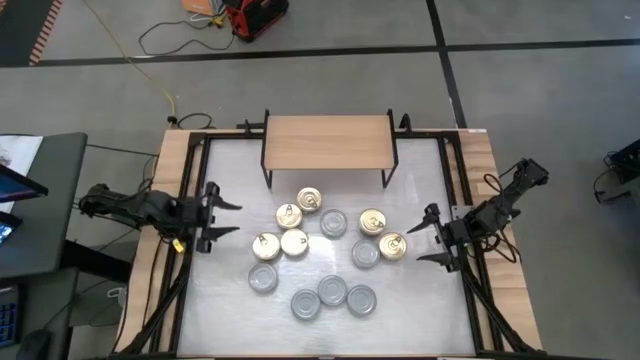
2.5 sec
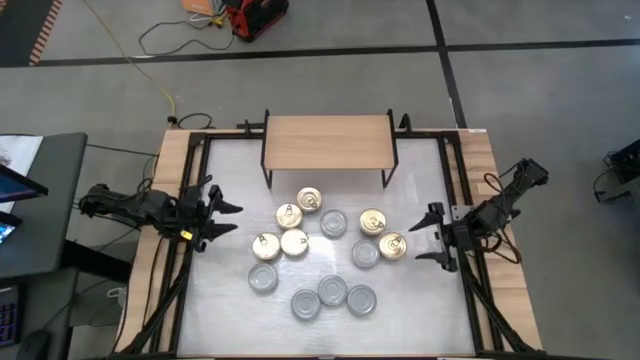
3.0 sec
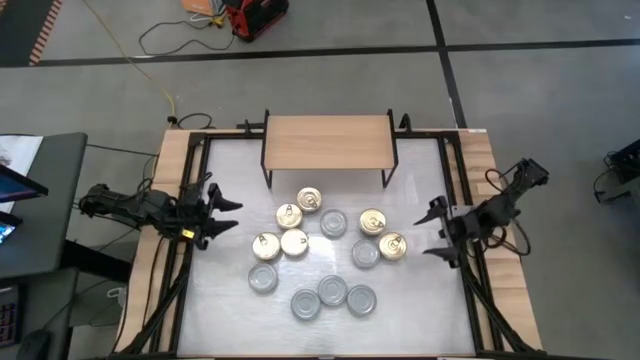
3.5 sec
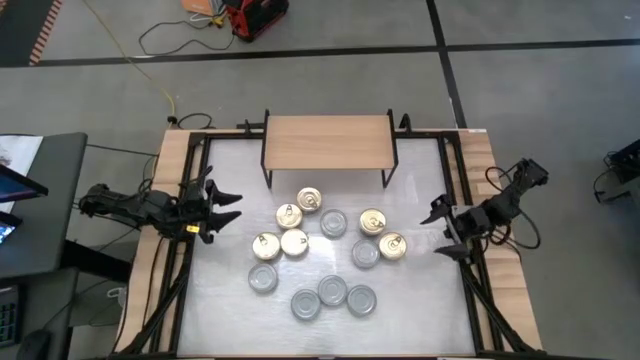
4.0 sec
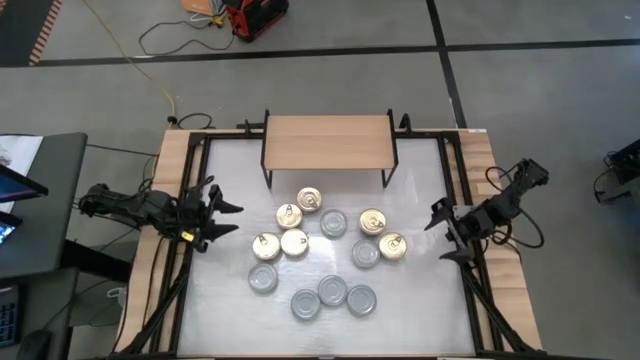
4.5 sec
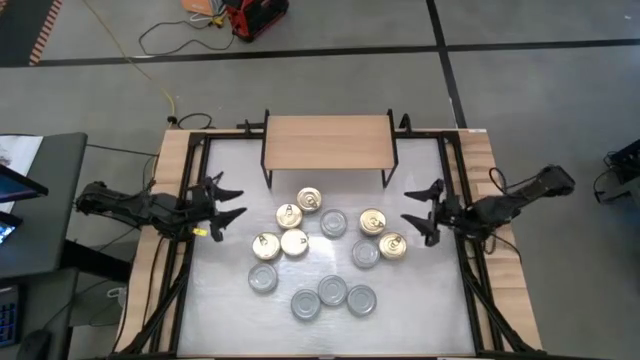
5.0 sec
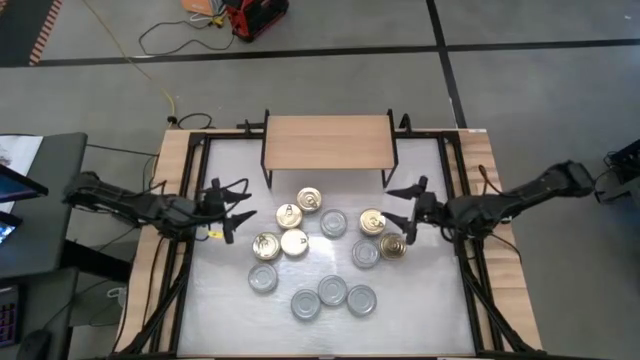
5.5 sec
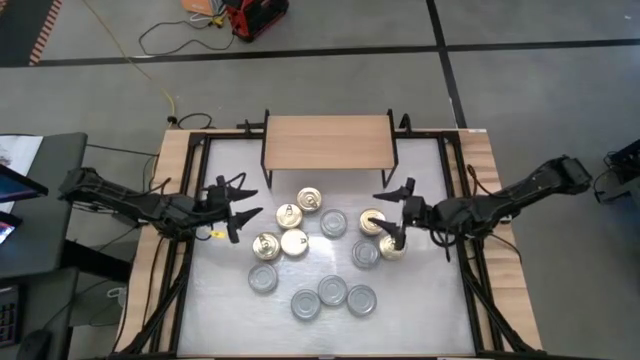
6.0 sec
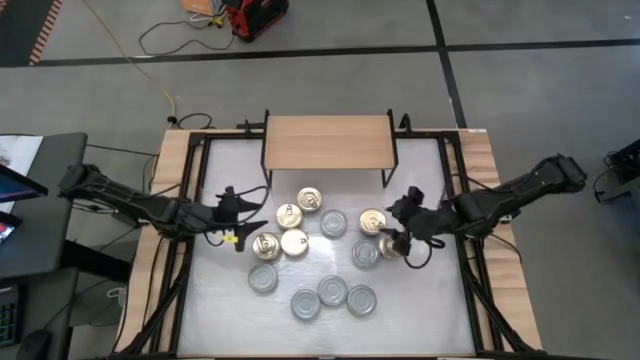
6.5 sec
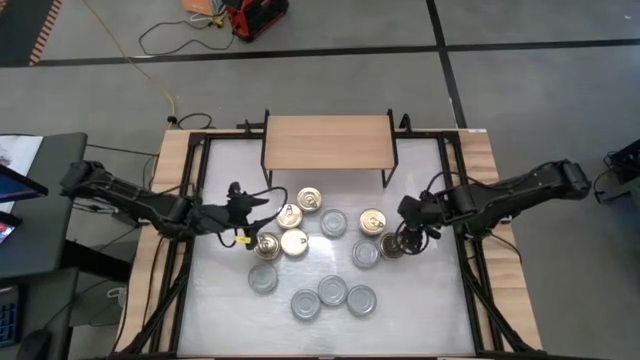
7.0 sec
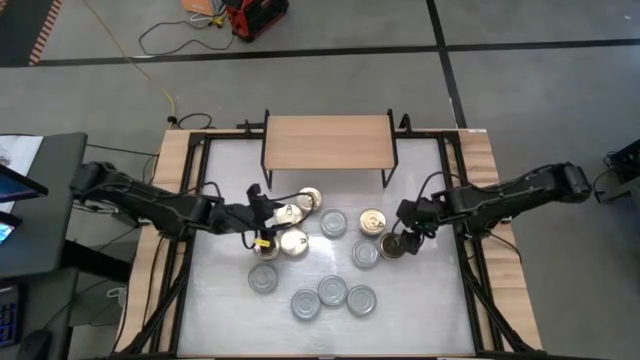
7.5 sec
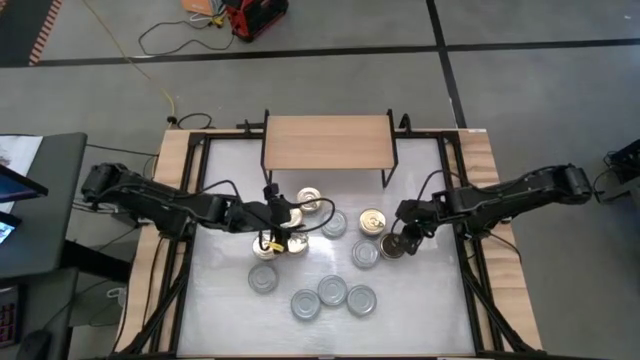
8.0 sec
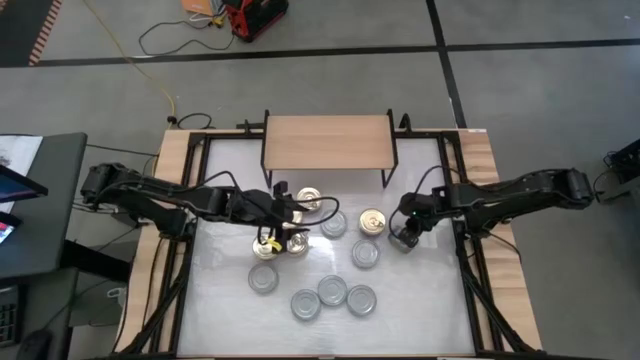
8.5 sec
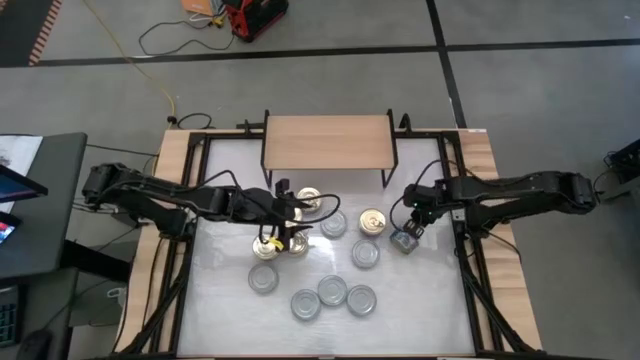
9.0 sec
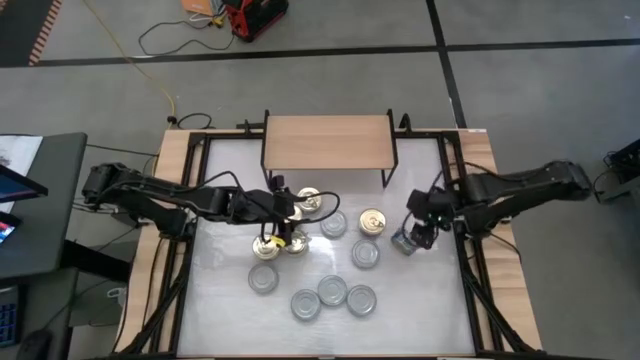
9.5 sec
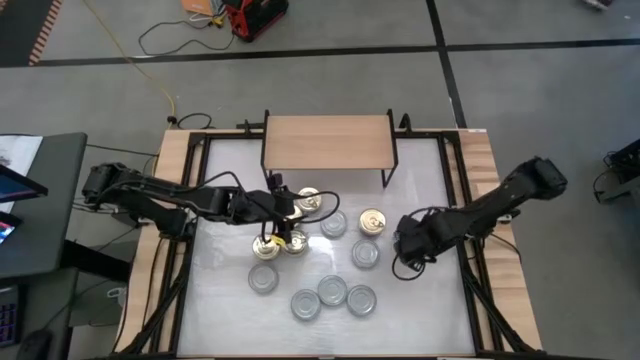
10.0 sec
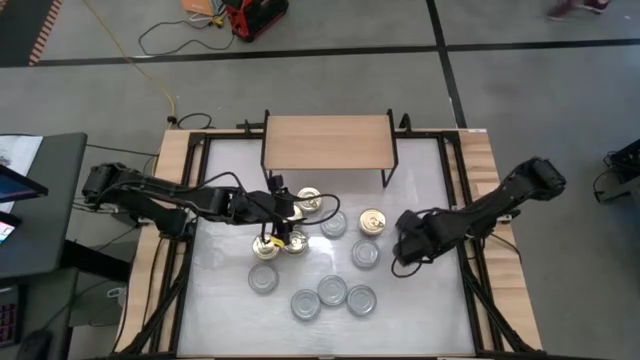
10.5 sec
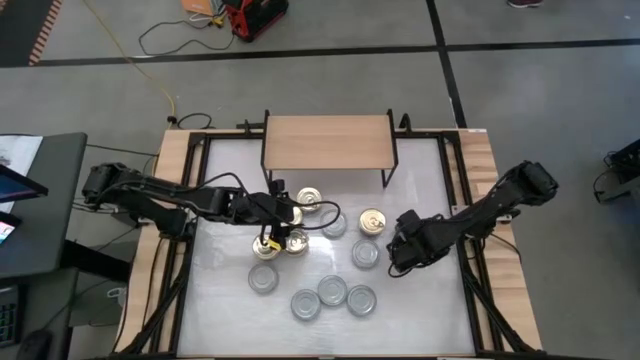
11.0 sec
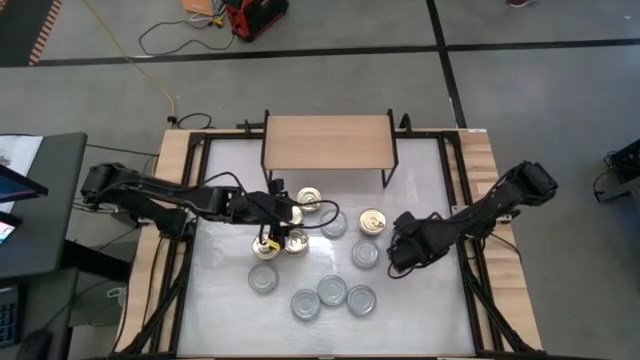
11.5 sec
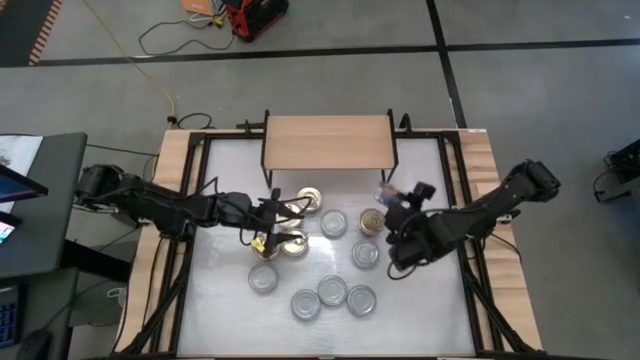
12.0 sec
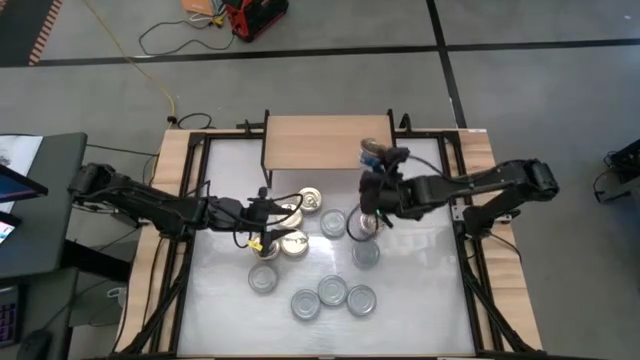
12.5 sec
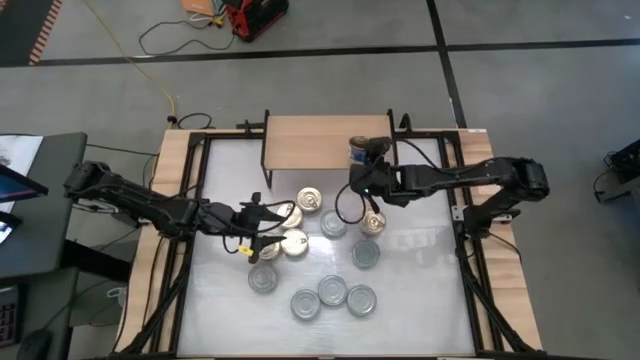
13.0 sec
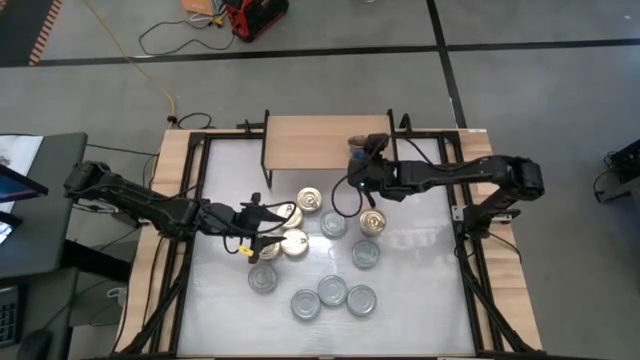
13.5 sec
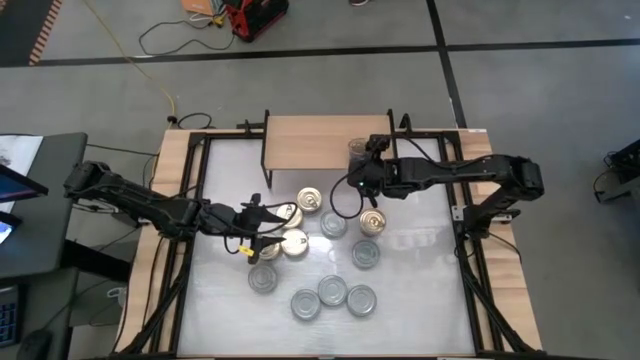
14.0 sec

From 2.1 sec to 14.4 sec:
Task: Stack canned seafood by type on shelf
Put the blue pink tuna can on the shelf

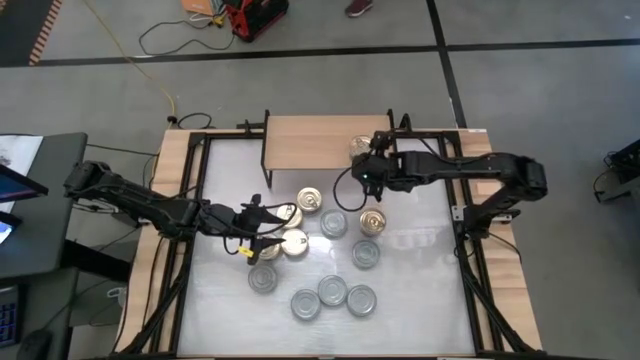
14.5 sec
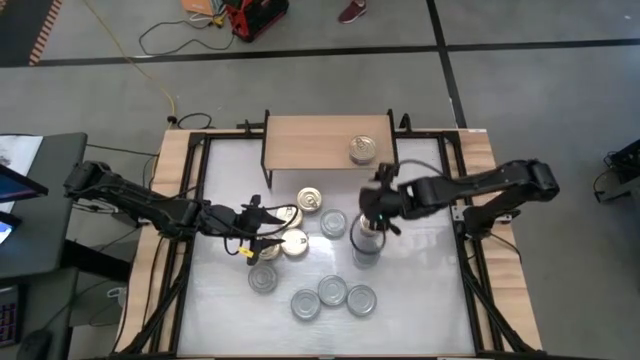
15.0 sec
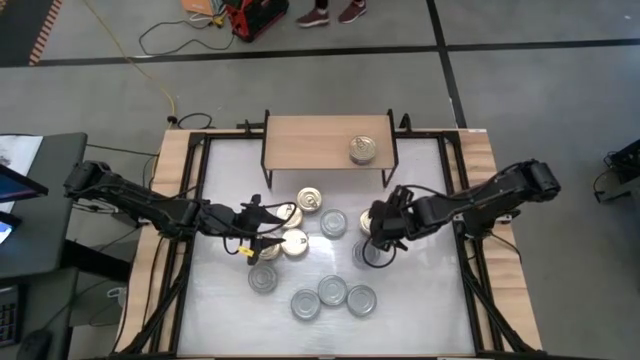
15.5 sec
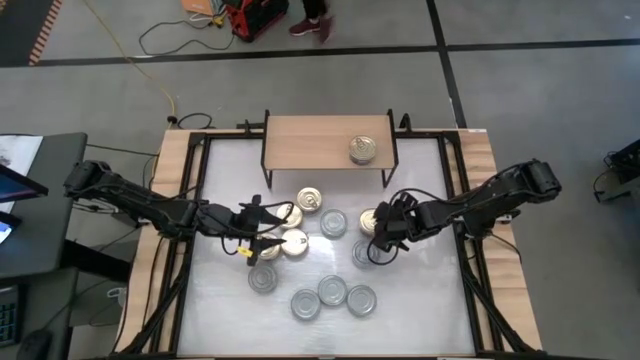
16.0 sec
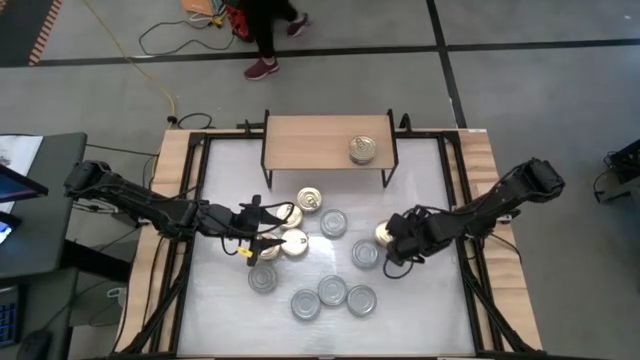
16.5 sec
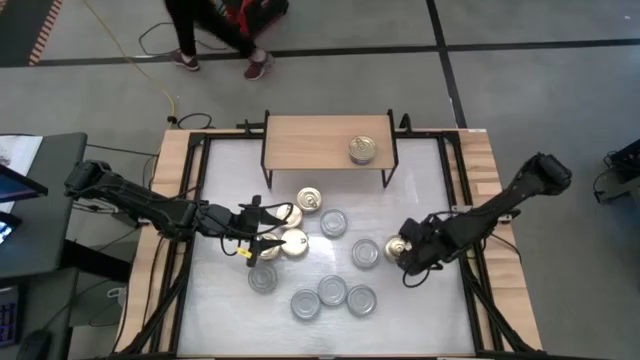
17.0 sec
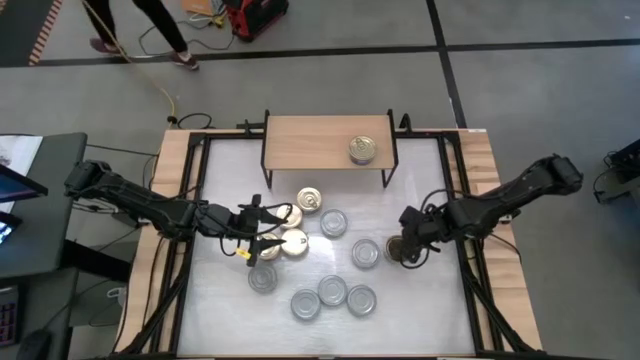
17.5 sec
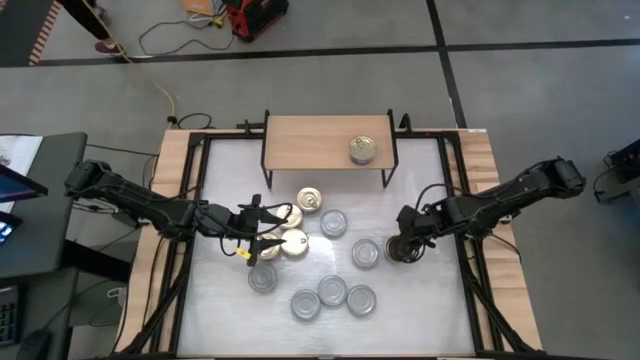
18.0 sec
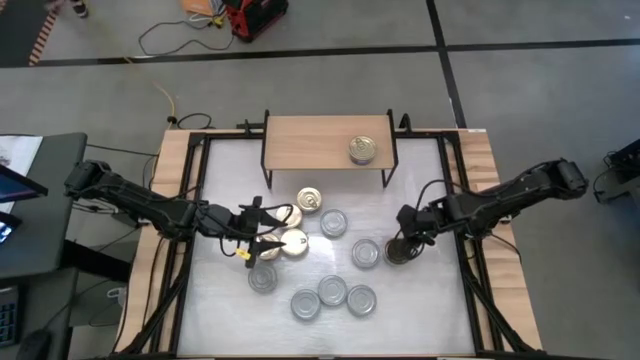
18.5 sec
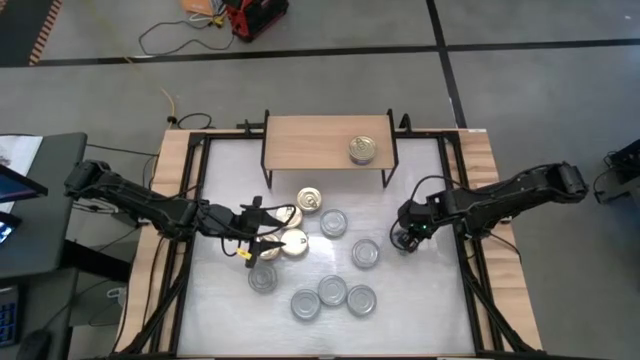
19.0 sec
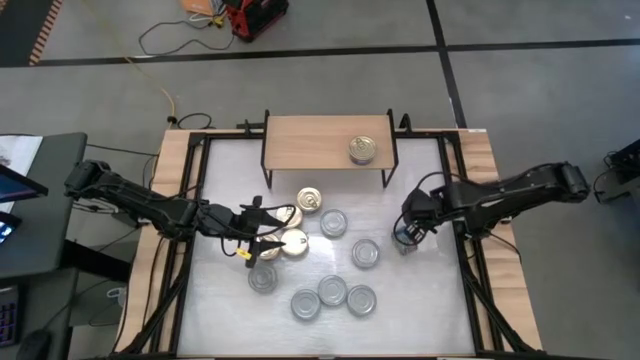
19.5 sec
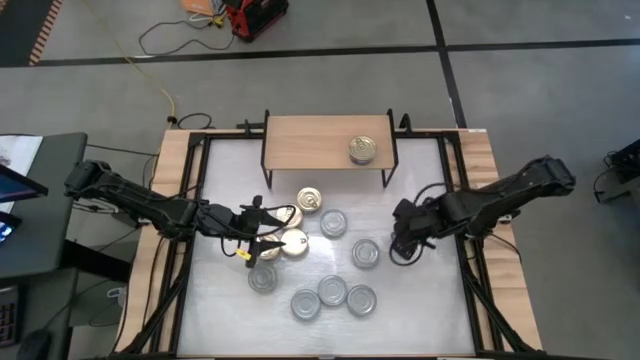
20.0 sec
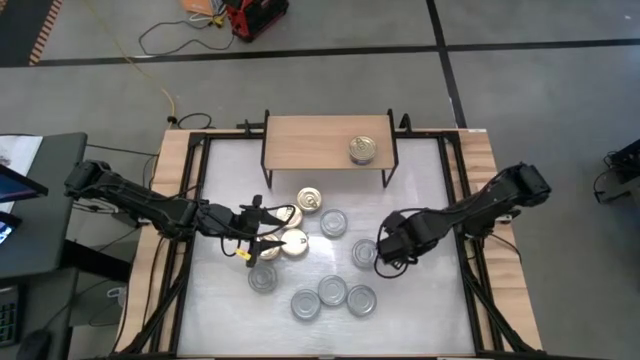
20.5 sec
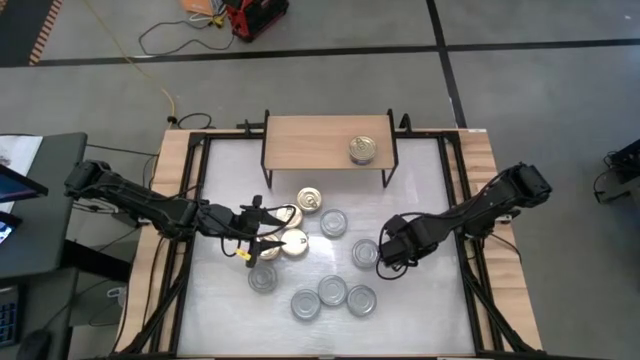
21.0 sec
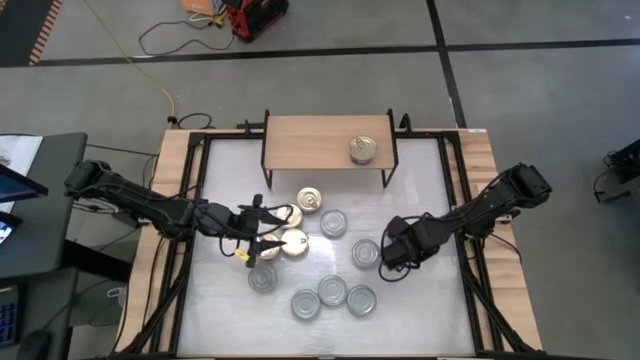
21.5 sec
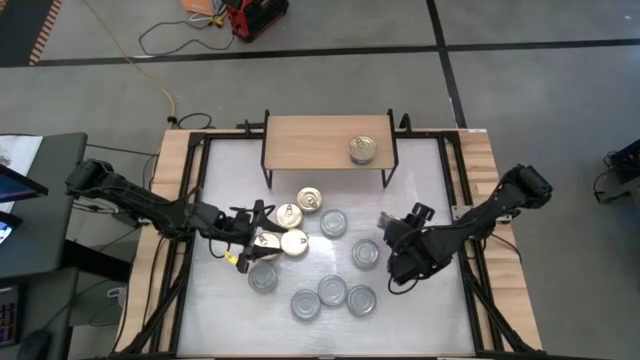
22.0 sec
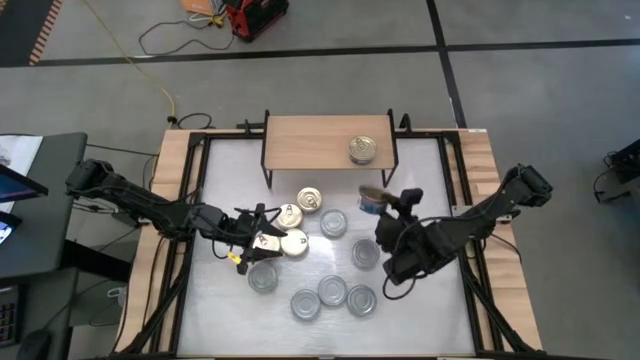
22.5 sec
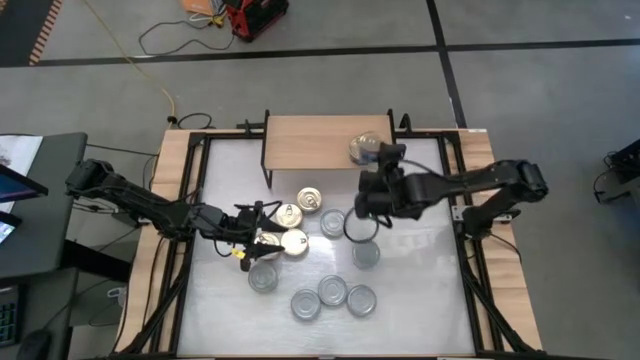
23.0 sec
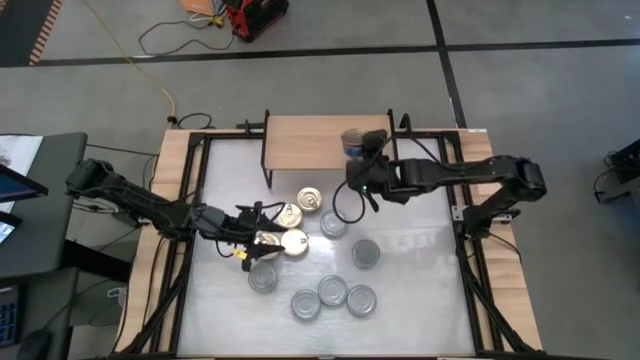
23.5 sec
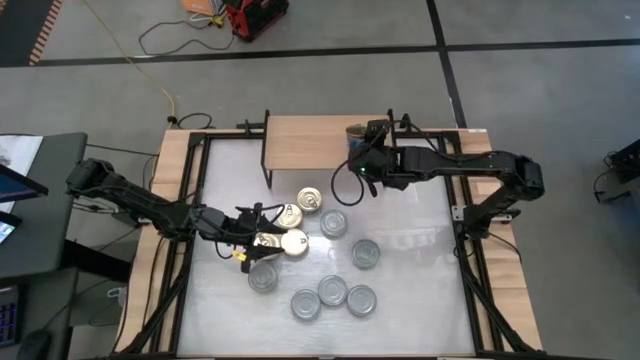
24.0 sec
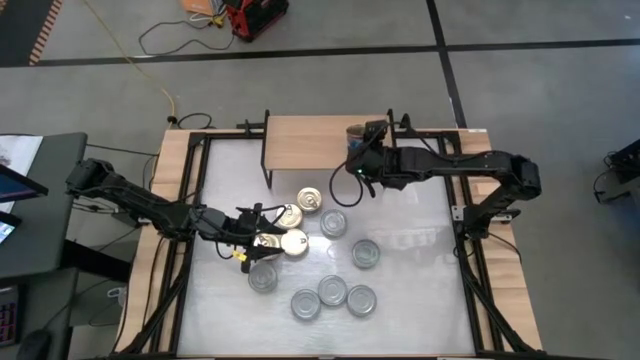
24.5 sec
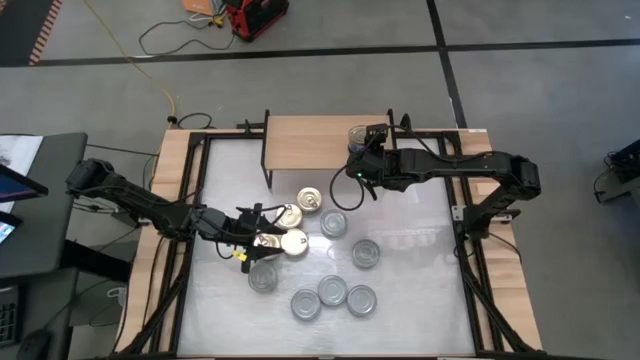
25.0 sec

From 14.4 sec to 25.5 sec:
Stack the blue pink tuna can on top of the other blue pink tuna can on the shelf
